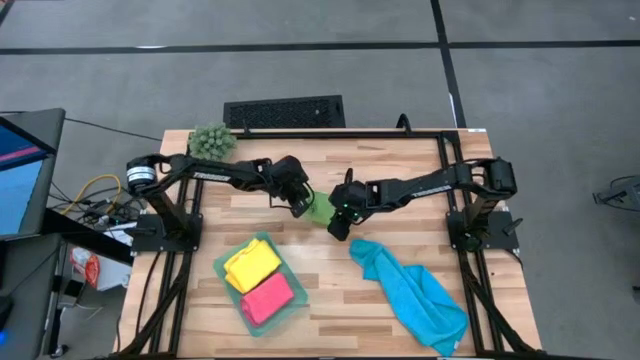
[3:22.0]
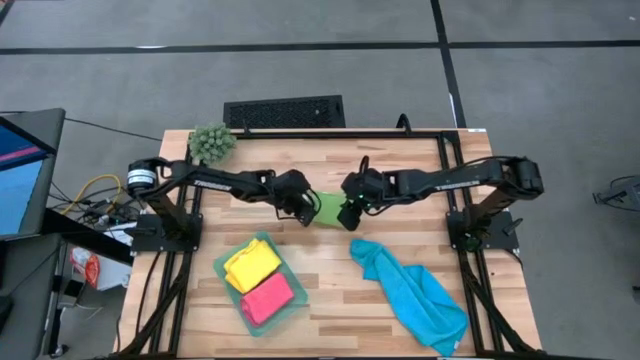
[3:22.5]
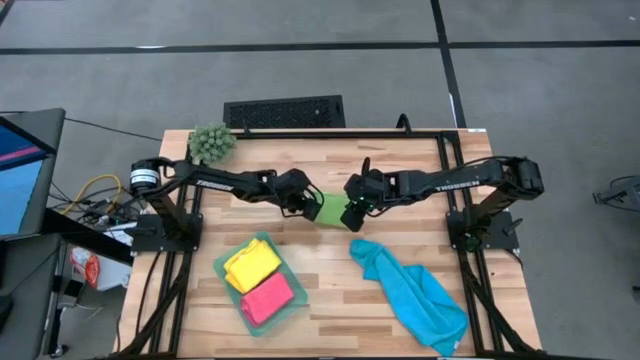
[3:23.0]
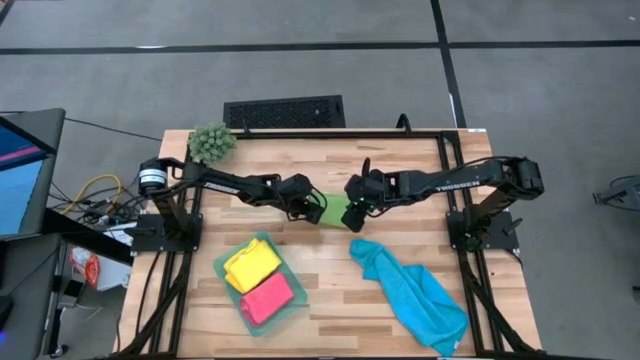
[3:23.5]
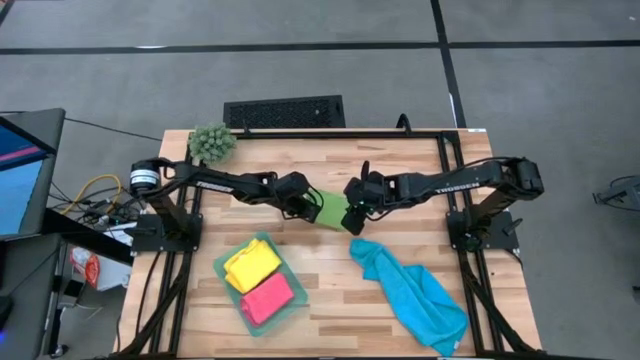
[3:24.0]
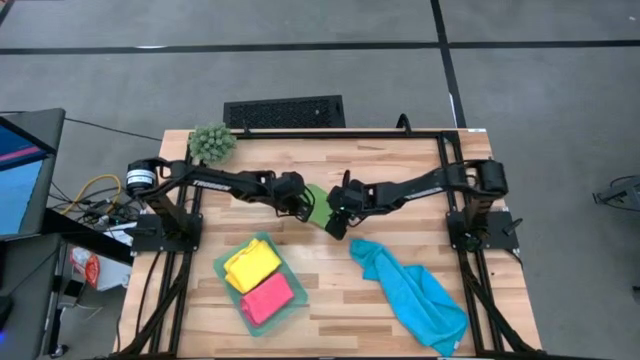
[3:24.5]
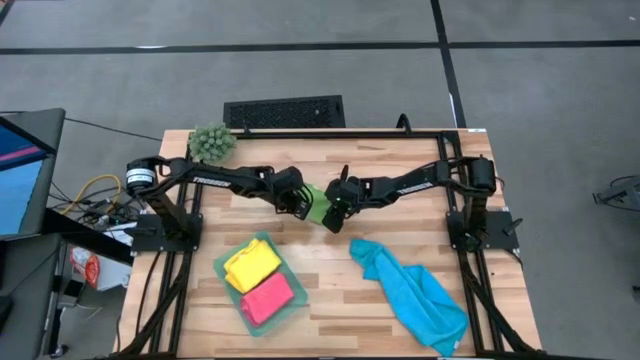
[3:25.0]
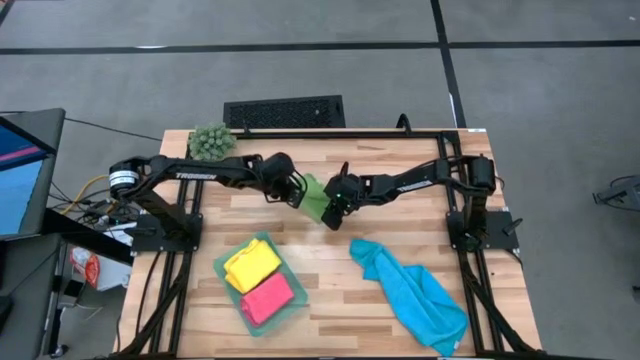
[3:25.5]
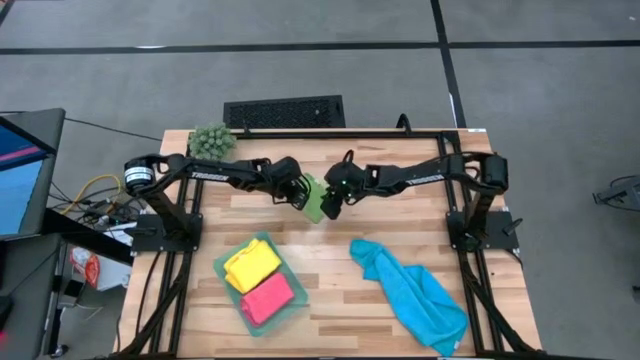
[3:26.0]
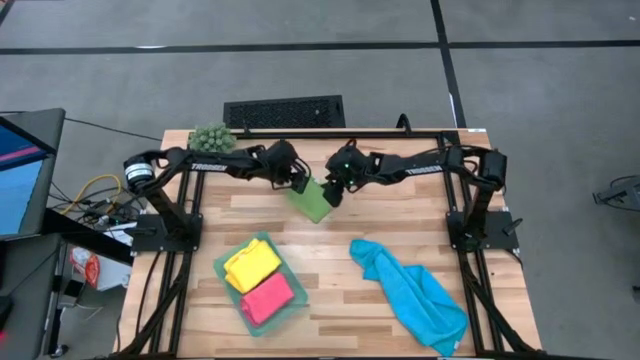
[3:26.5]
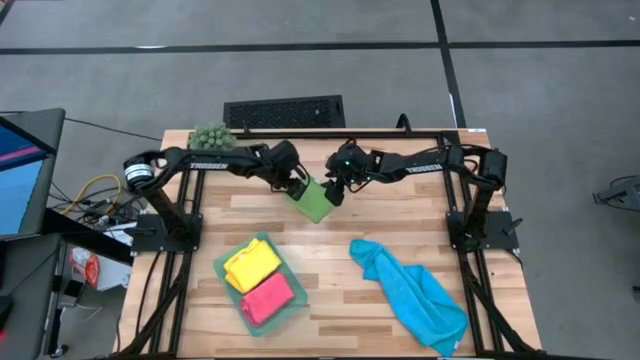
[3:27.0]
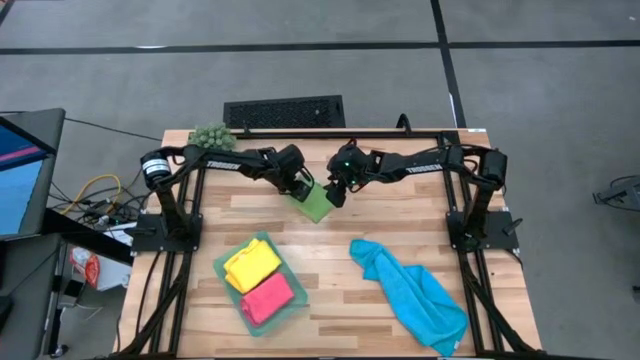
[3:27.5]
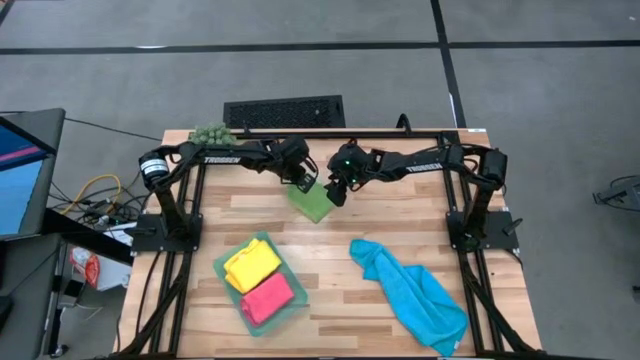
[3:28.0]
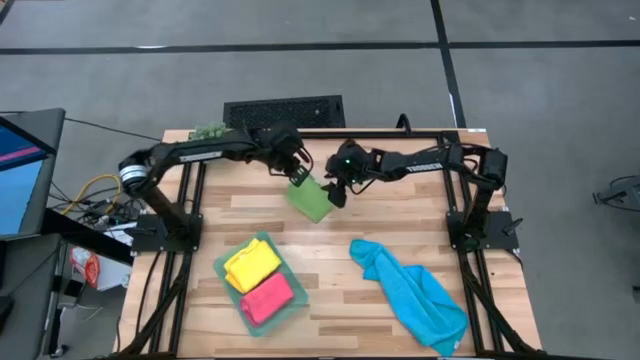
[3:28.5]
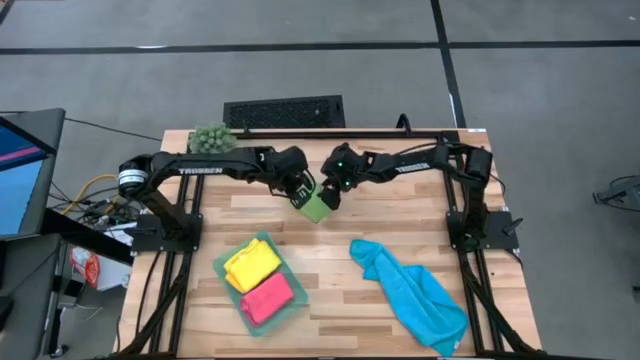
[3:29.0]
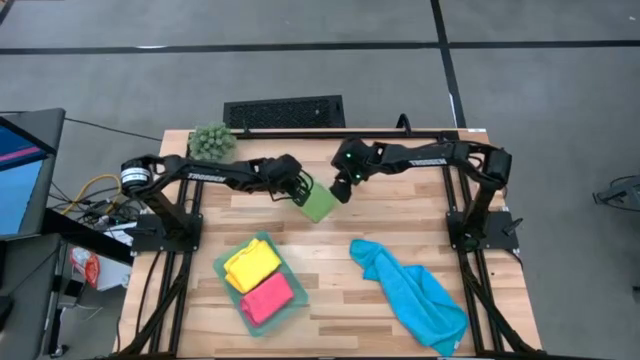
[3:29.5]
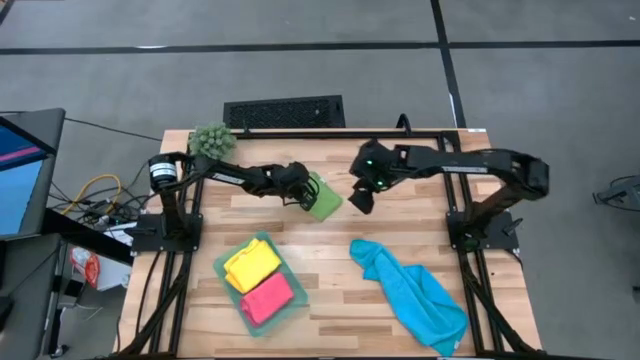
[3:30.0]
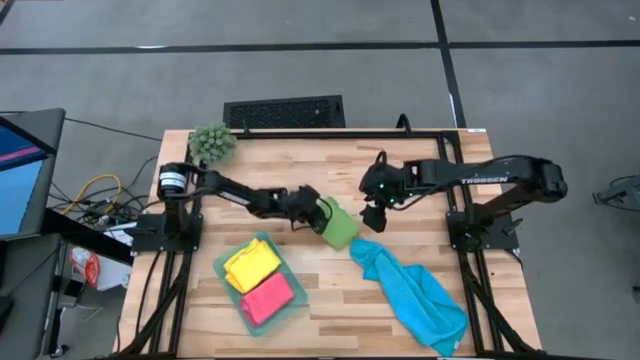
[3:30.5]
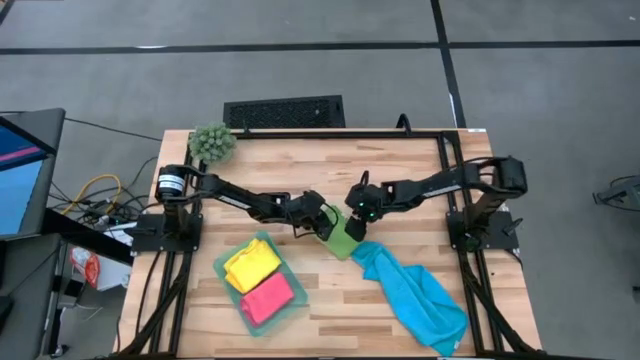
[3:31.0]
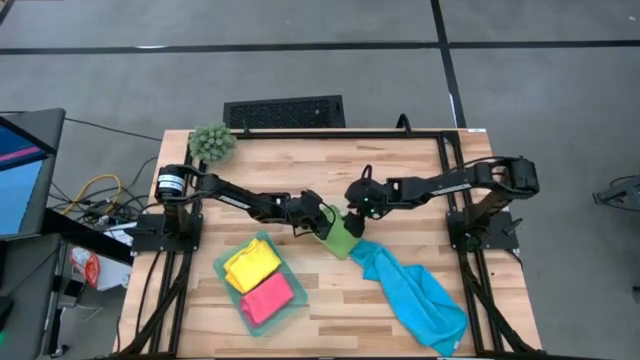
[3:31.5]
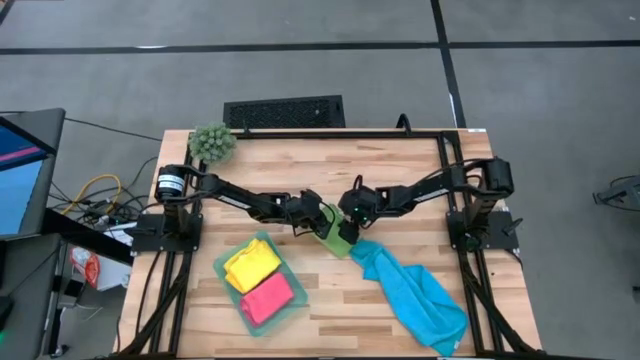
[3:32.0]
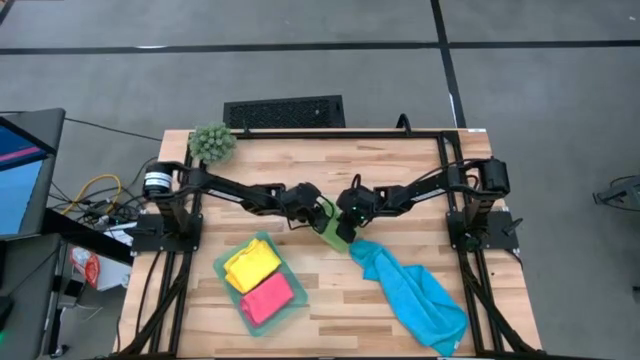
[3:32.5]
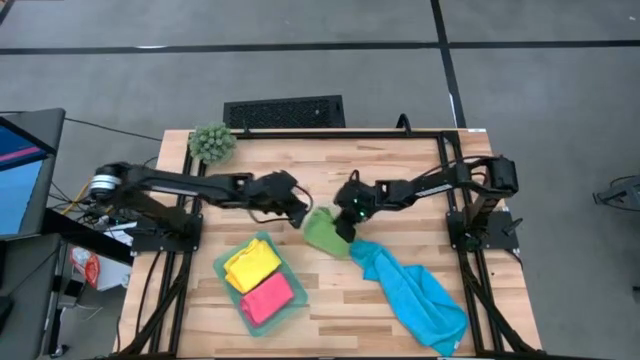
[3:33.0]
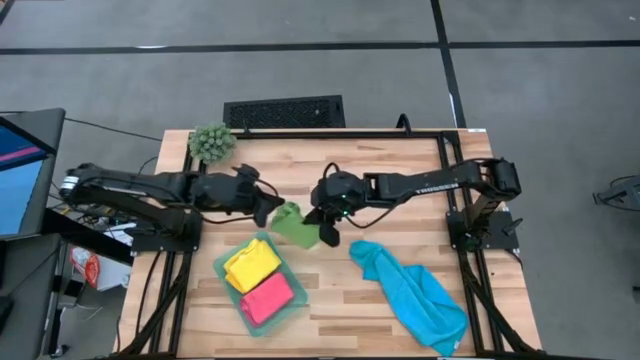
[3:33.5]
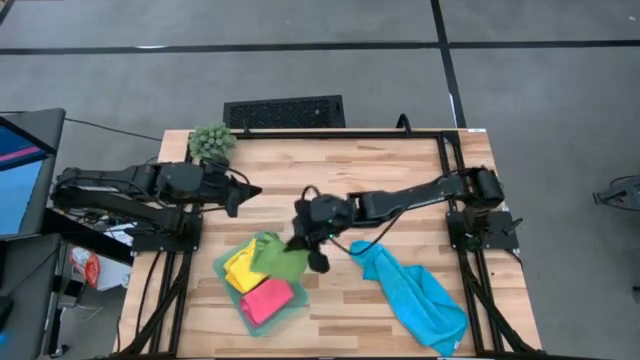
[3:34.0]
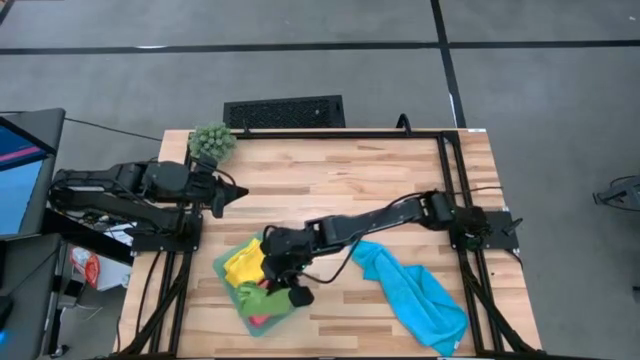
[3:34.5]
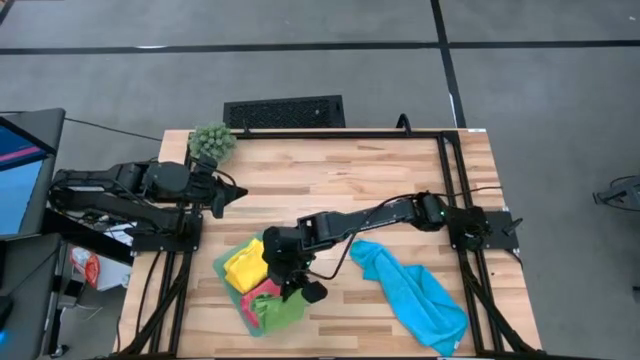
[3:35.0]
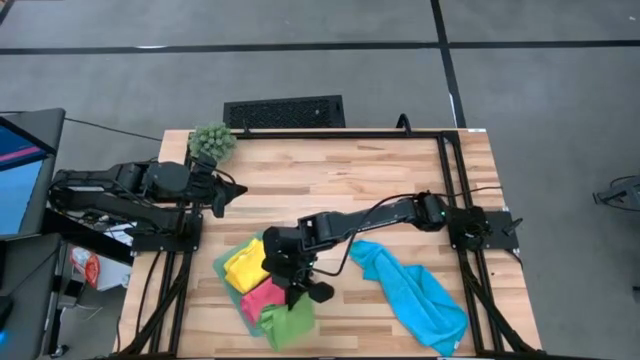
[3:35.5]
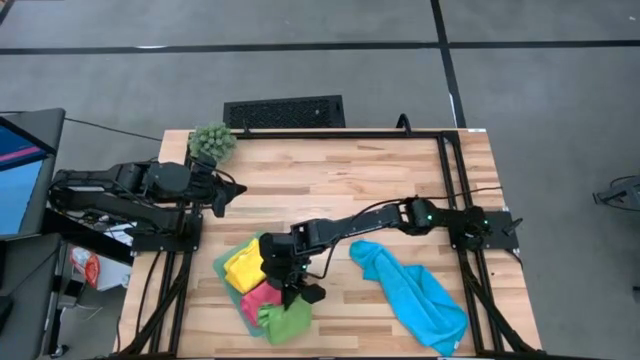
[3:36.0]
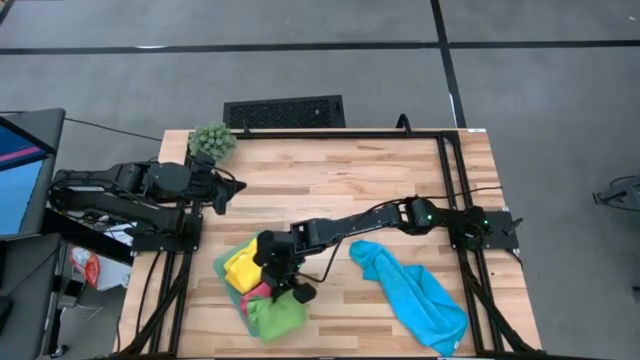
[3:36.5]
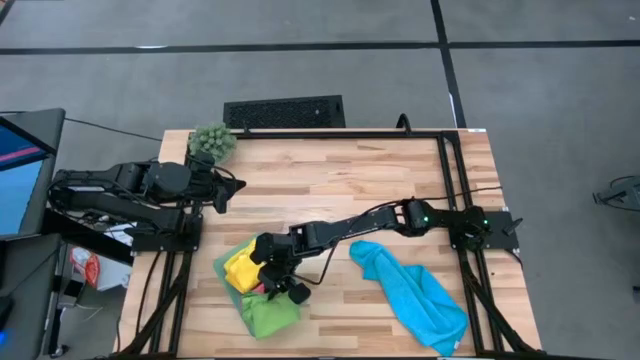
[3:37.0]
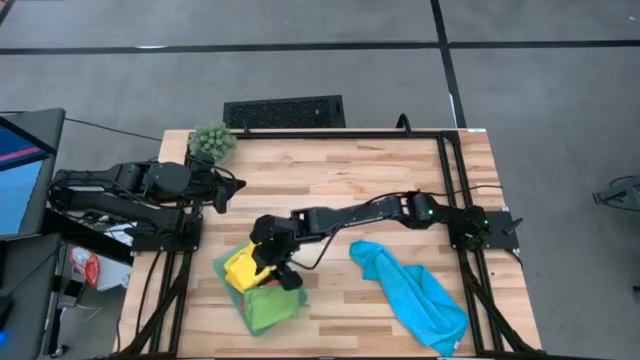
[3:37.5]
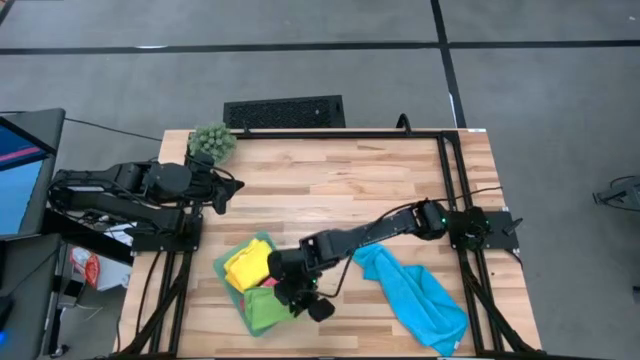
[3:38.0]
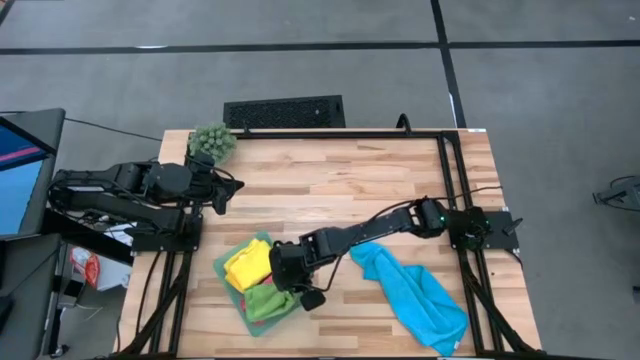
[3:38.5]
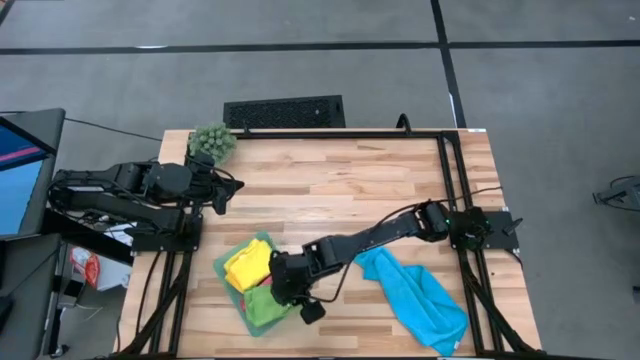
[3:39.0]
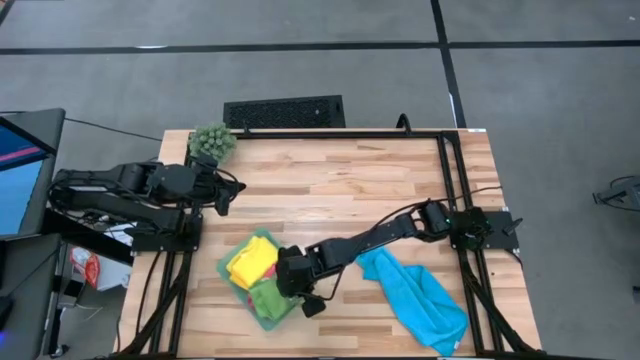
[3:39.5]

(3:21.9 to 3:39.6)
Task: Fold microfiber towels
Stack the folded green towel on top of the folded pink towel in the green bin
